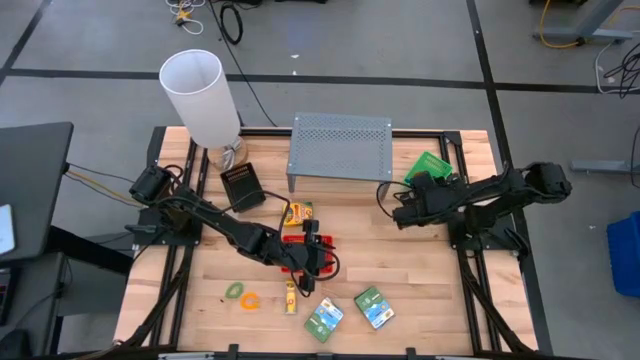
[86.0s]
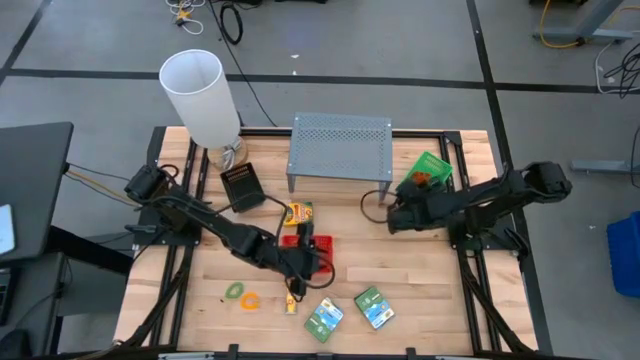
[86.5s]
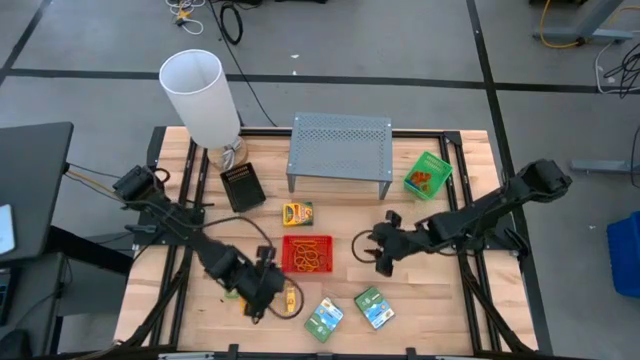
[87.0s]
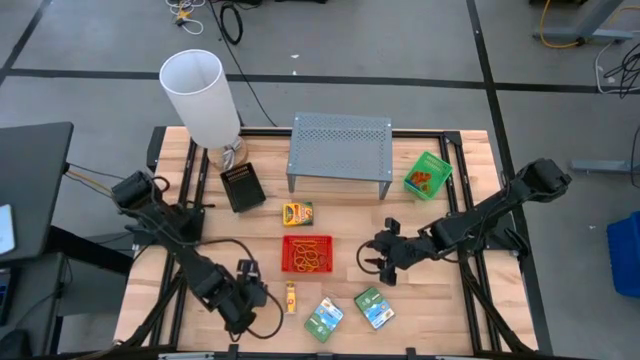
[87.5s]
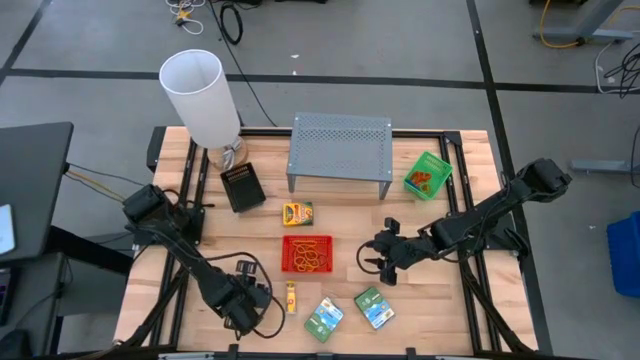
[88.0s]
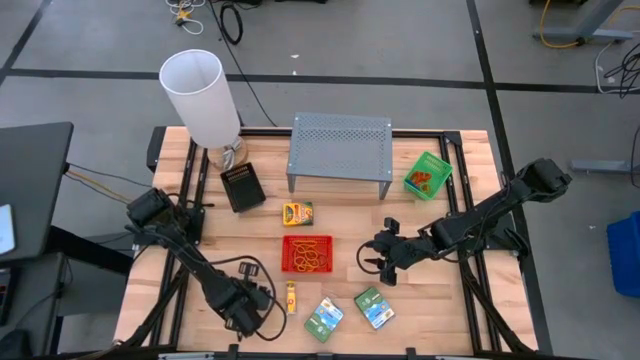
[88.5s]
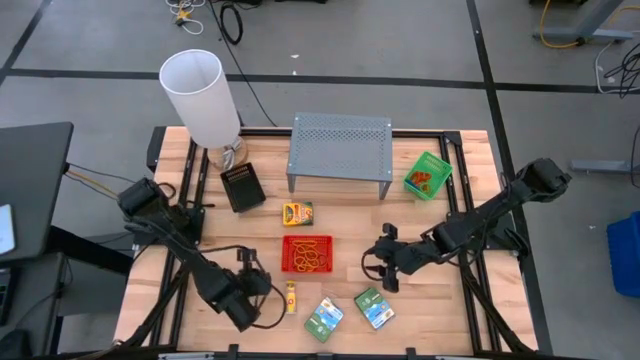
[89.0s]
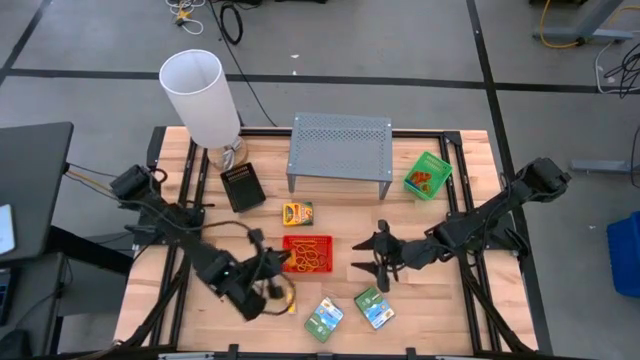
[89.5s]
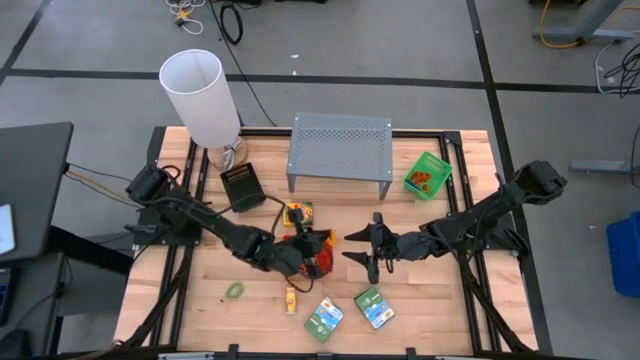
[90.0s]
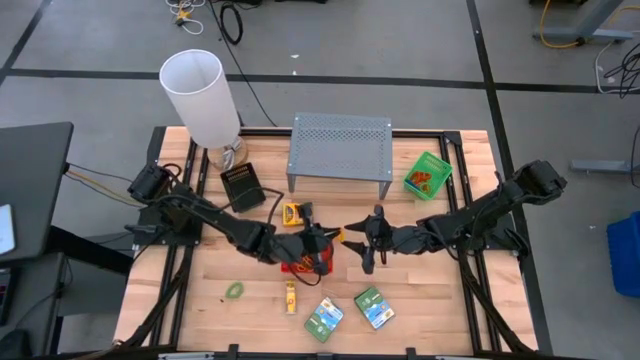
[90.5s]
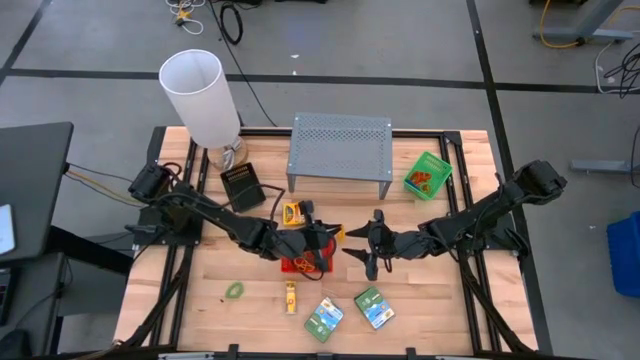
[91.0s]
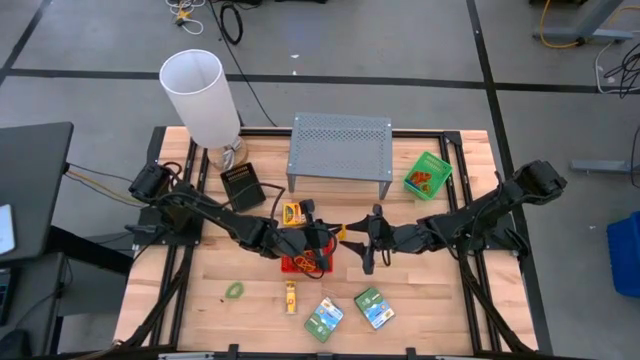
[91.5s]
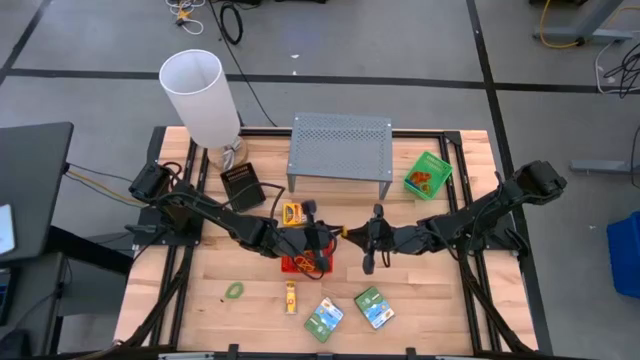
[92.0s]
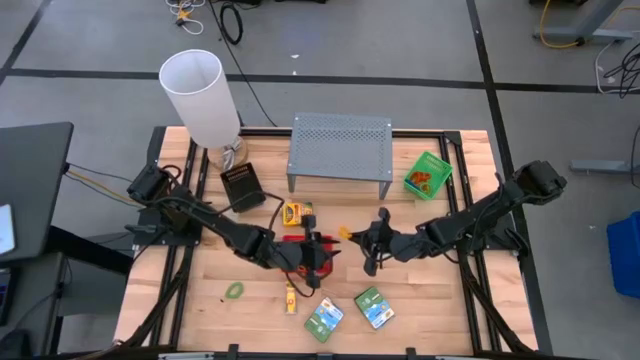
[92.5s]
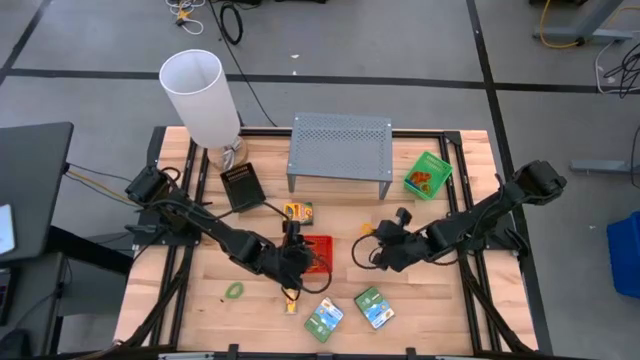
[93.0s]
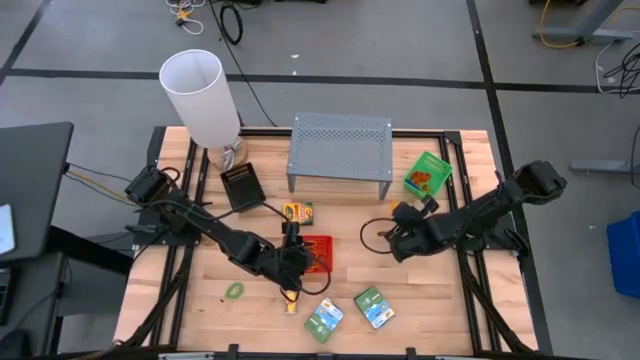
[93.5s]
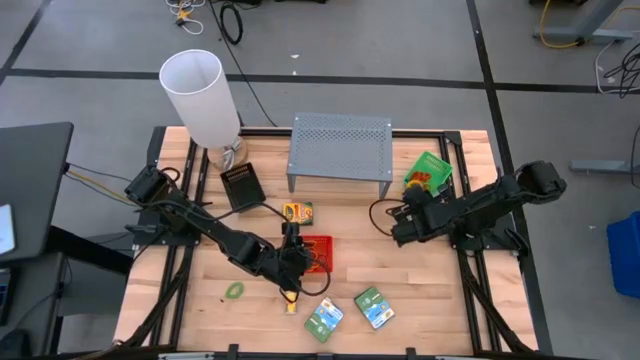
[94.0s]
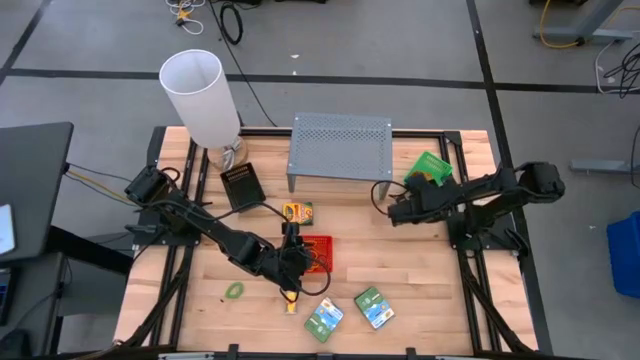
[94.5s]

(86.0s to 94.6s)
Task: Pick & Place Office Desk Supplies
Put the yellow spring keychain into the green bin

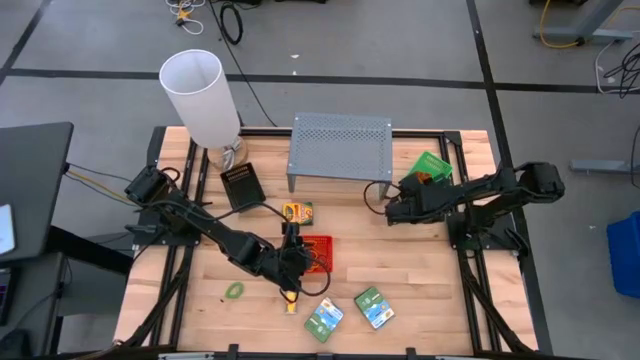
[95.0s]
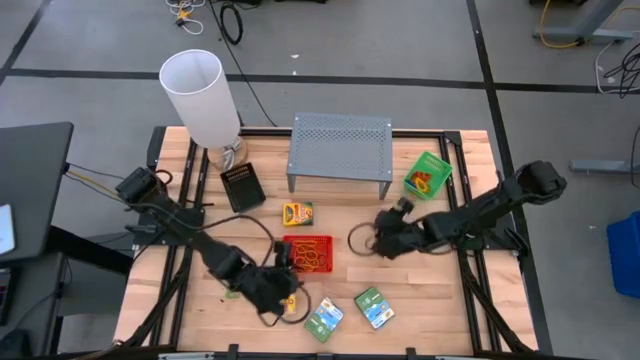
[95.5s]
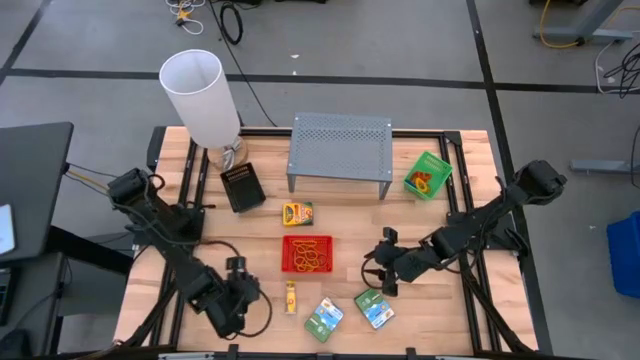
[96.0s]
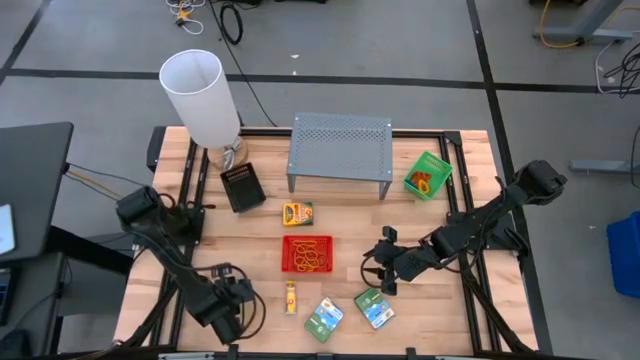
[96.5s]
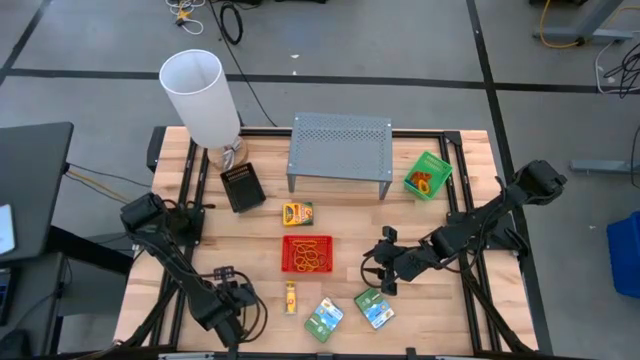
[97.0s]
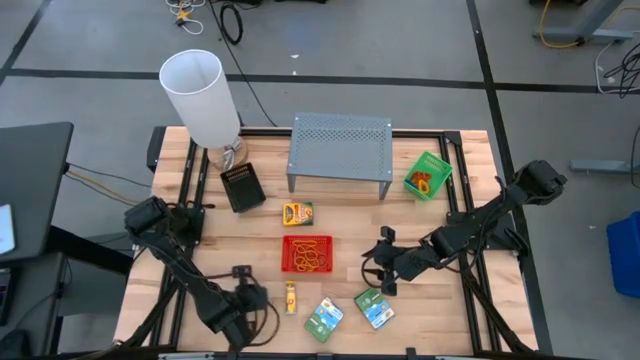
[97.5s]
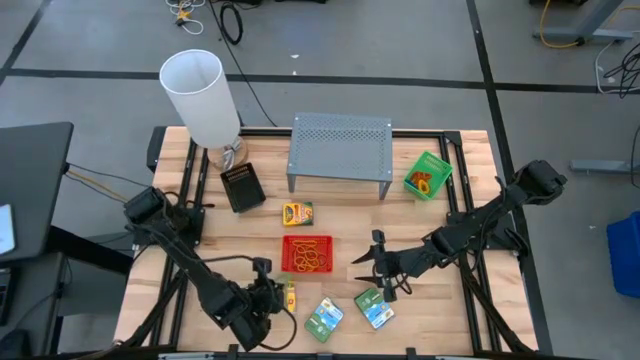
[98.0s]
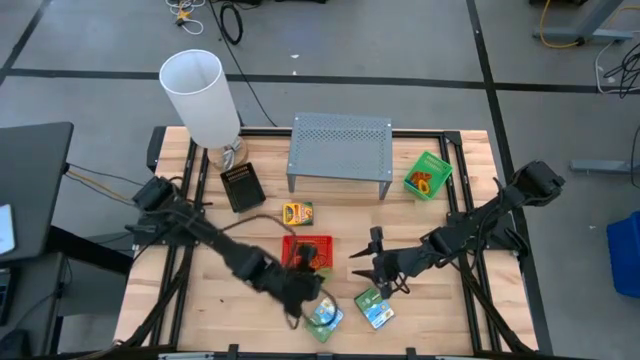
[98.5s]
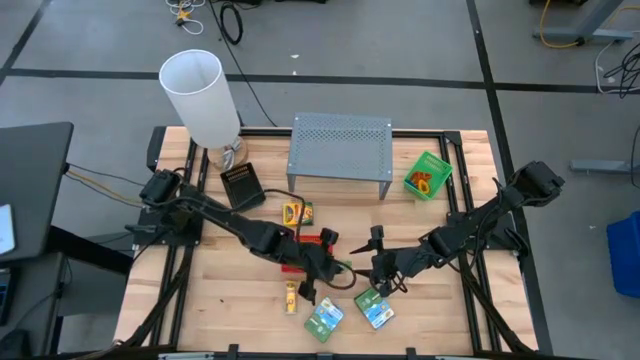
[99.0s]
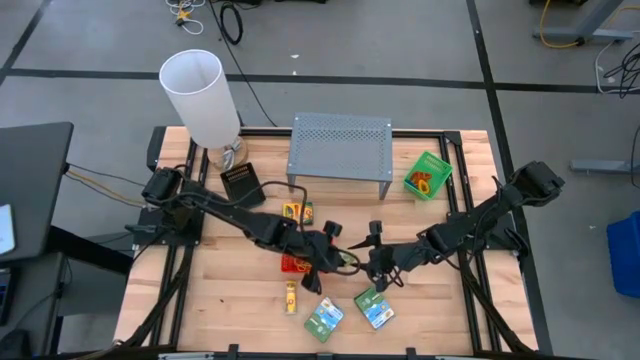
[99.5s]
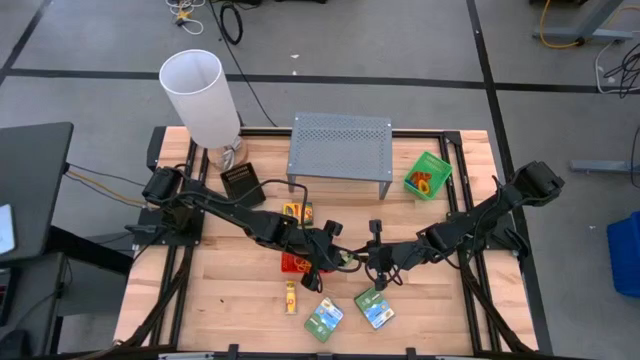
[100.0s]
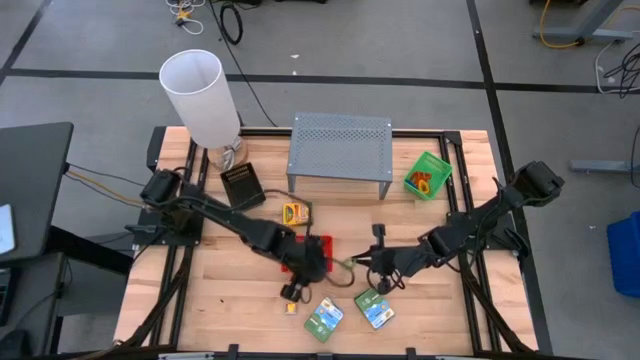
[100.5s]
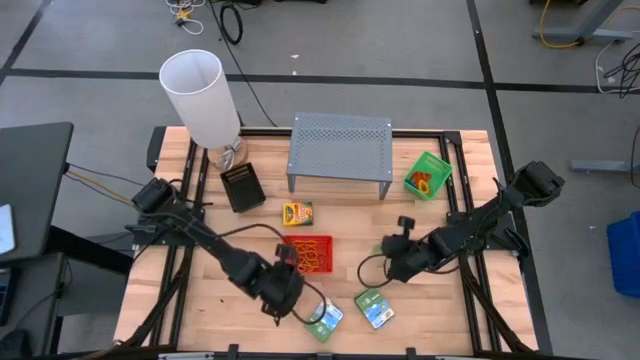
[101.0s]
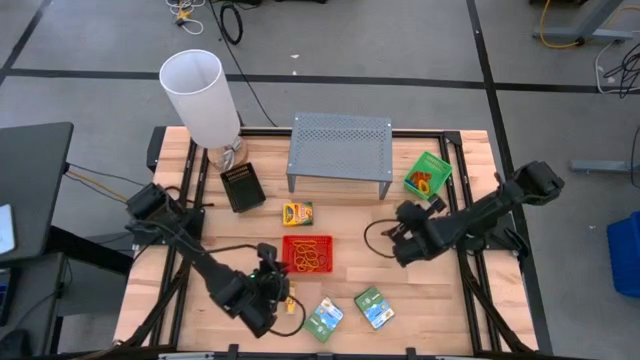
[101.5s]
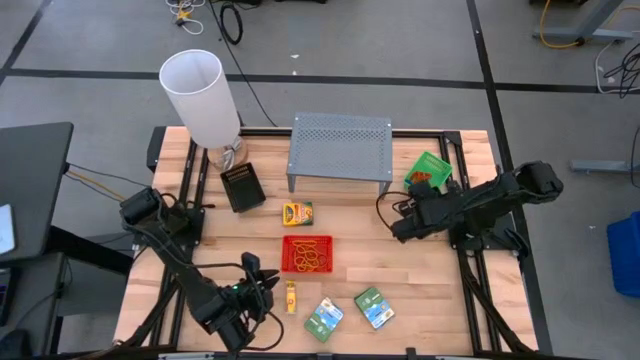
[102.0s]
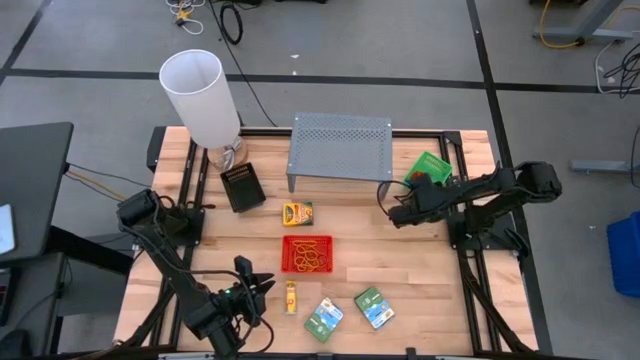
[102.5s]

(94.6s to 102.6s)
Put the green spring keychain into the green bin

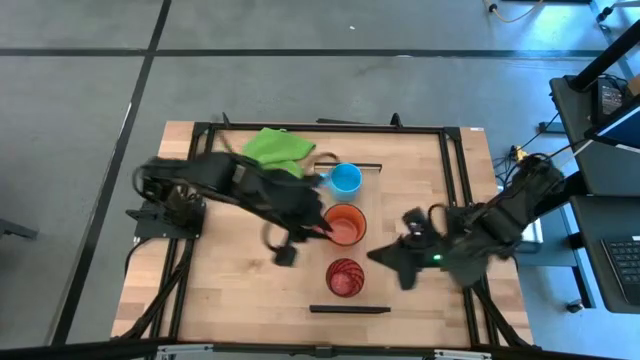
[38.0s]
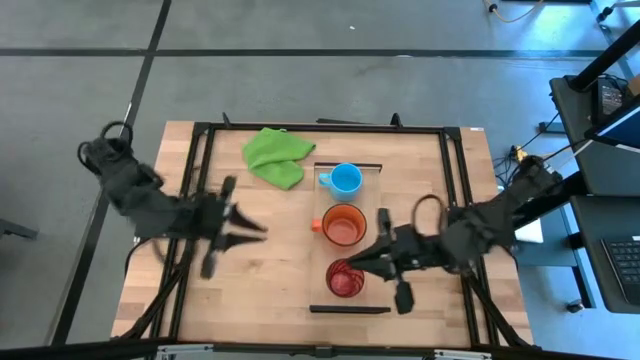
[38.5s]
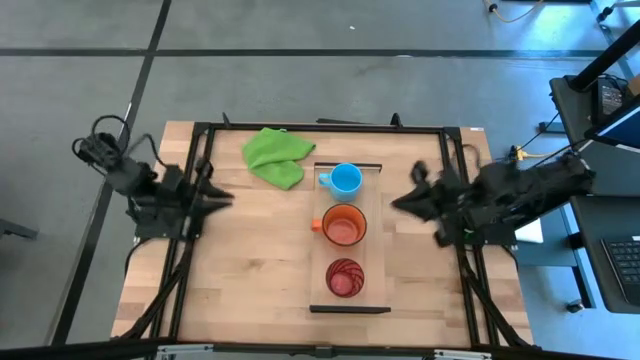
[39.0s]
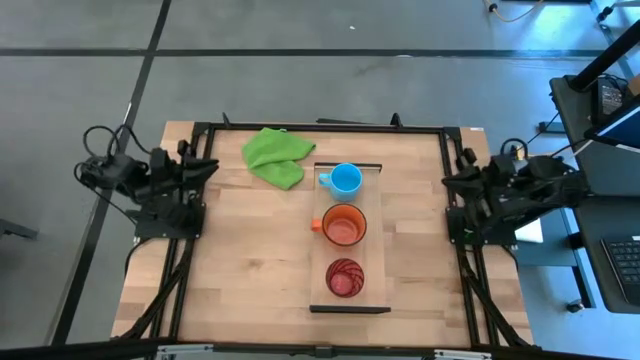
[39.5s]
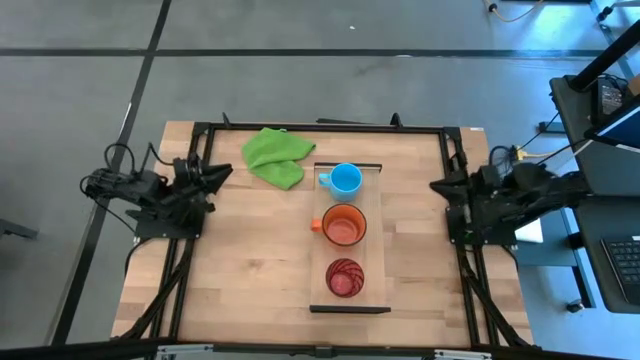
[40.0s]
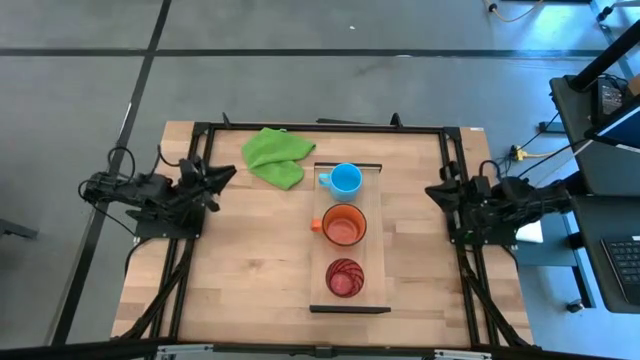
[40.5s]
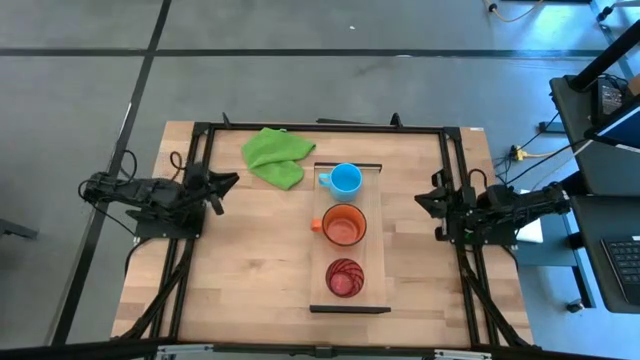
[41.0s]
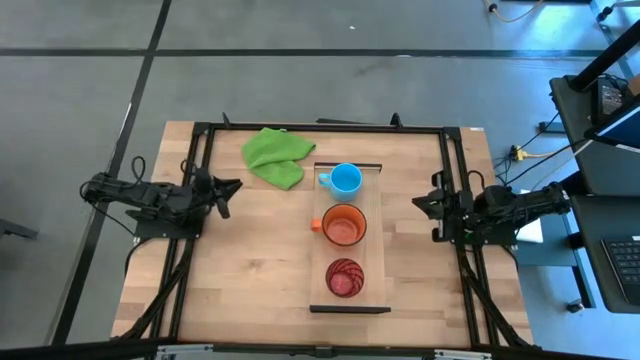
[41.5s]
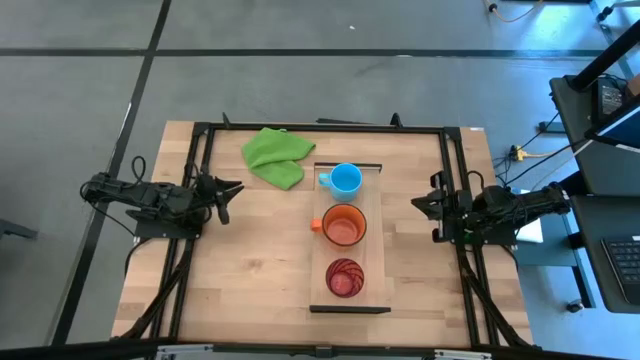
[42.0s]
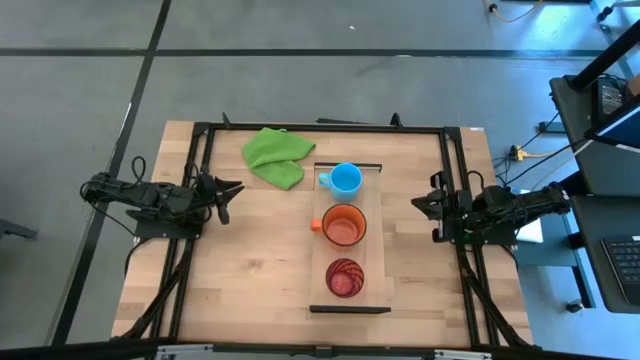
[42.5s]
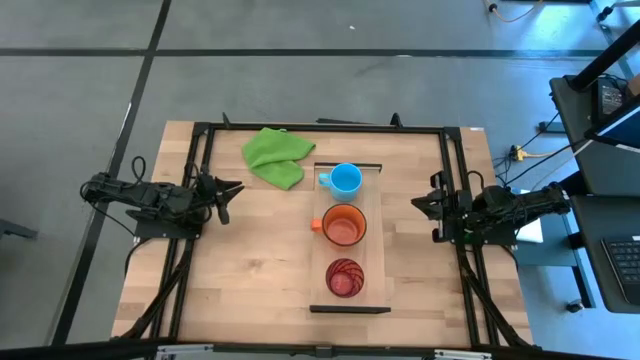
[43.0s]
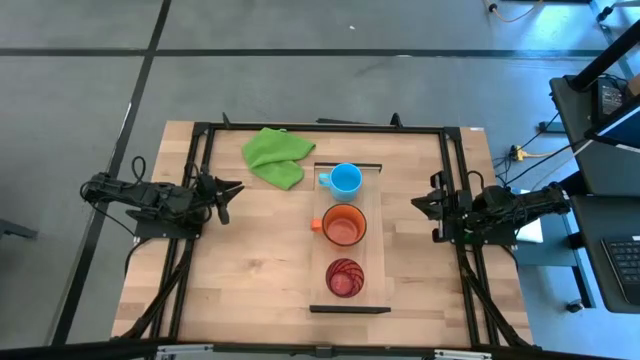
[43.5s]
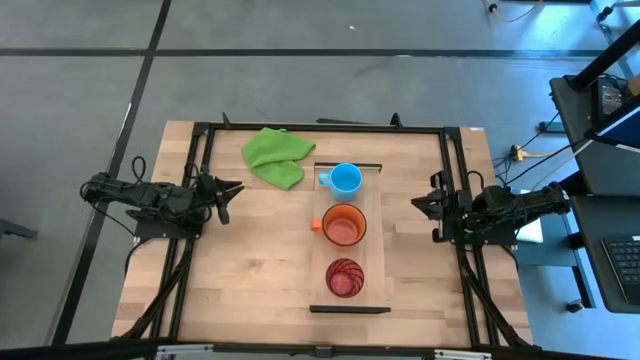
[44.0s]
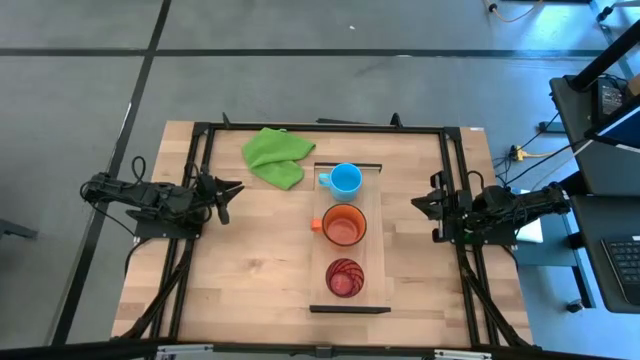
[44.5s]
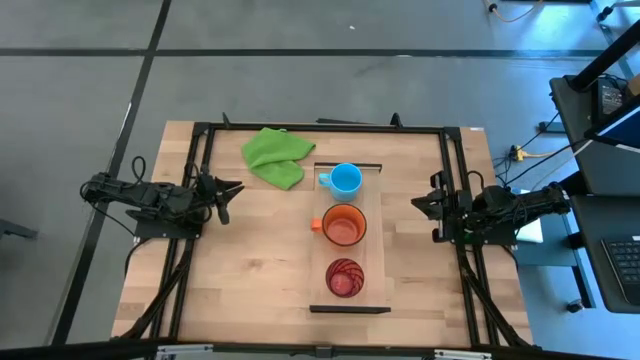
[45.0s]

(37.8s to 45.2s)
Task: Stack small to large cups/mugs on shelf
Return to Home Position
